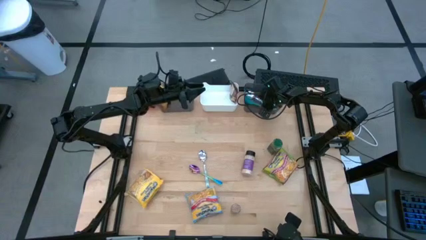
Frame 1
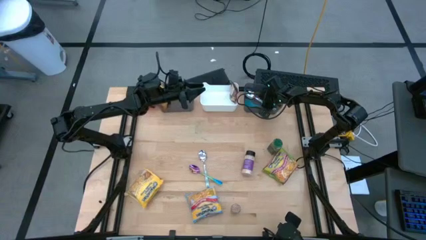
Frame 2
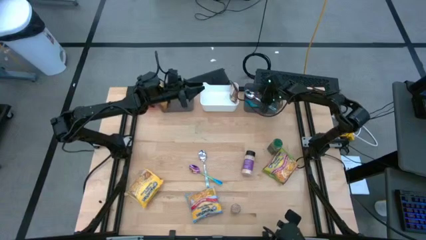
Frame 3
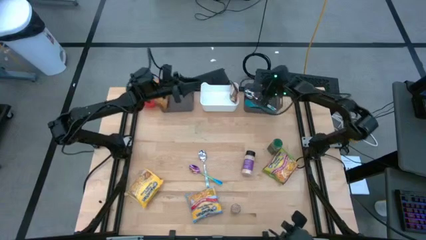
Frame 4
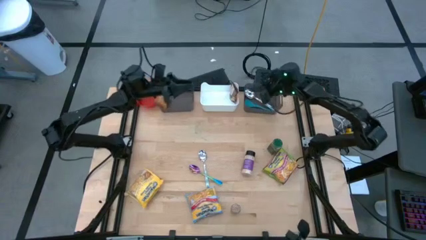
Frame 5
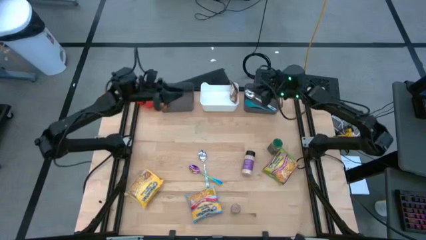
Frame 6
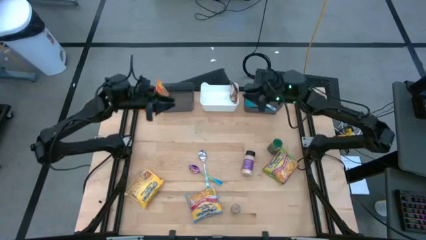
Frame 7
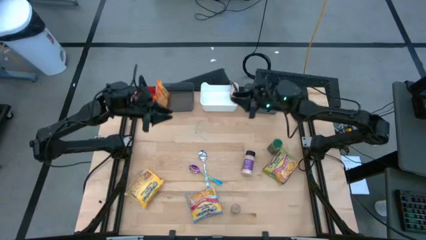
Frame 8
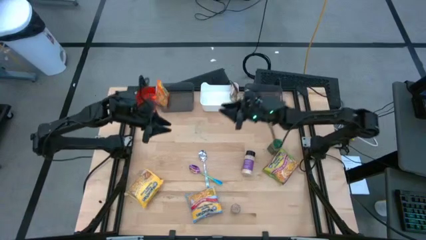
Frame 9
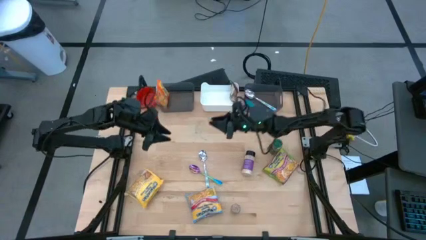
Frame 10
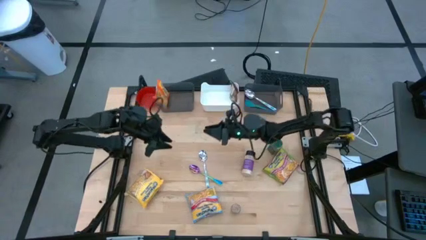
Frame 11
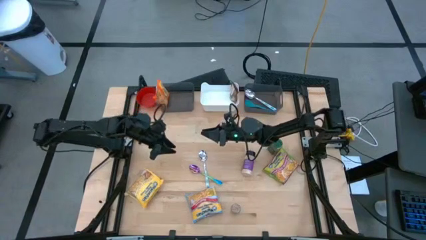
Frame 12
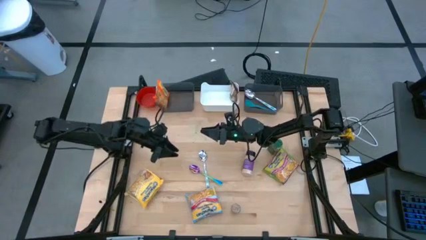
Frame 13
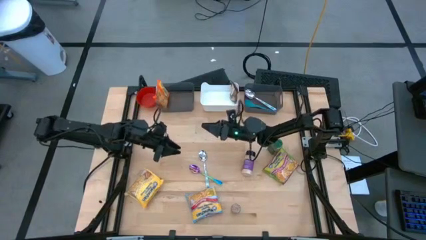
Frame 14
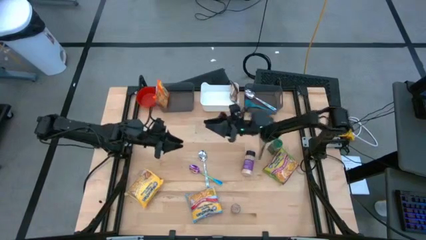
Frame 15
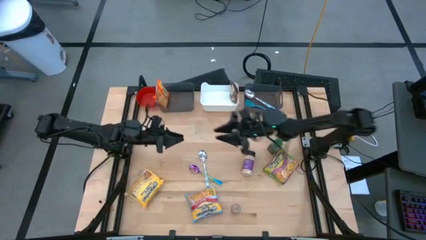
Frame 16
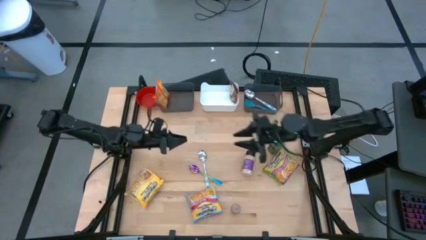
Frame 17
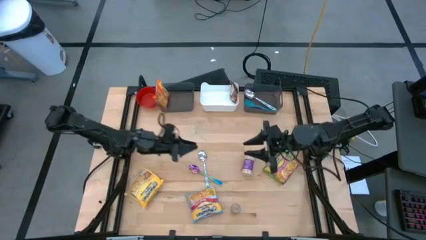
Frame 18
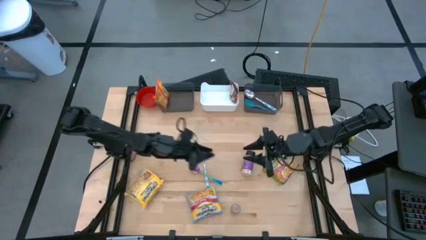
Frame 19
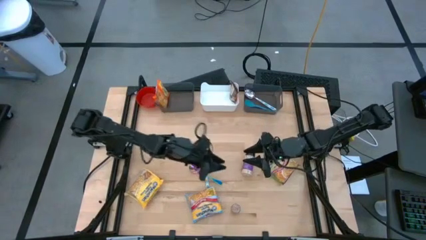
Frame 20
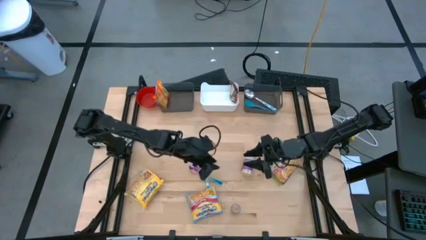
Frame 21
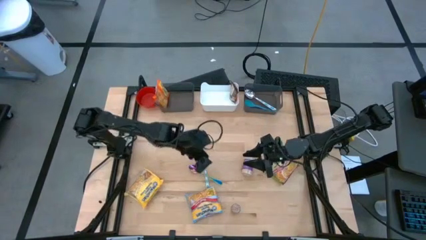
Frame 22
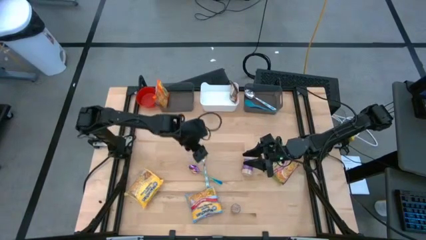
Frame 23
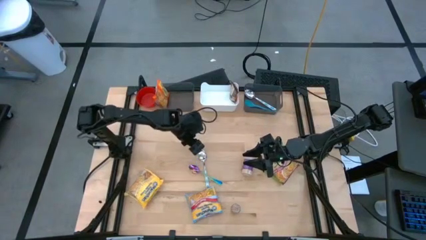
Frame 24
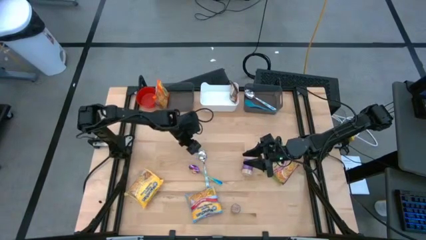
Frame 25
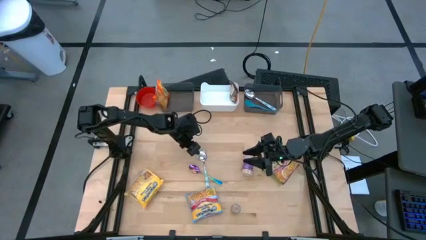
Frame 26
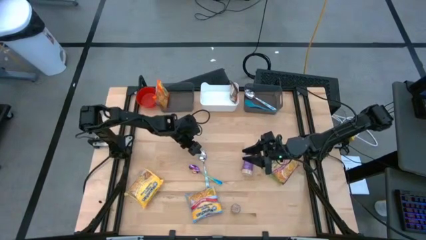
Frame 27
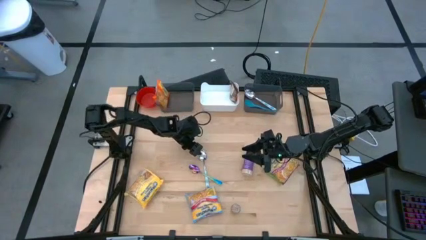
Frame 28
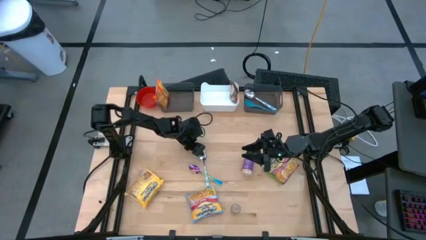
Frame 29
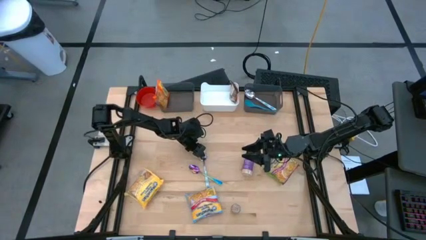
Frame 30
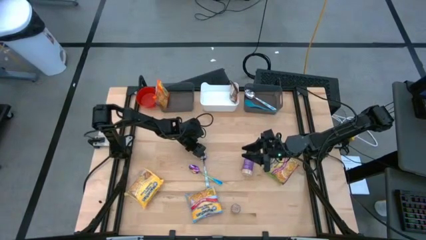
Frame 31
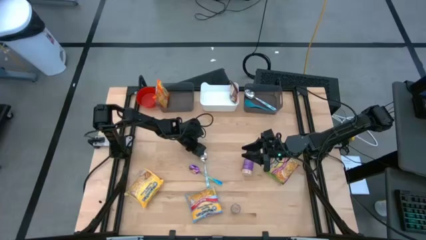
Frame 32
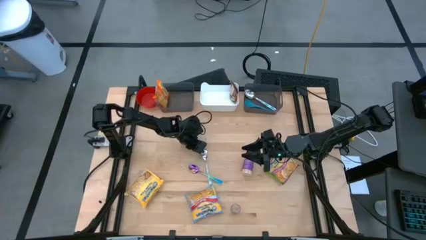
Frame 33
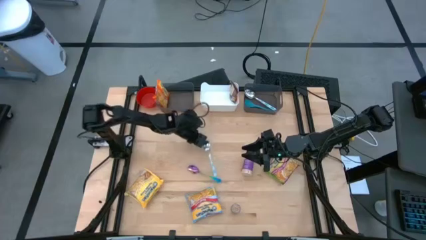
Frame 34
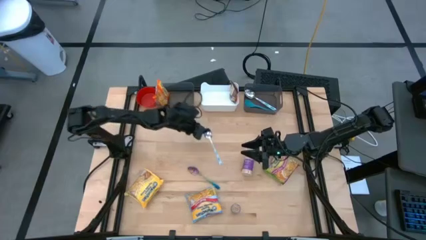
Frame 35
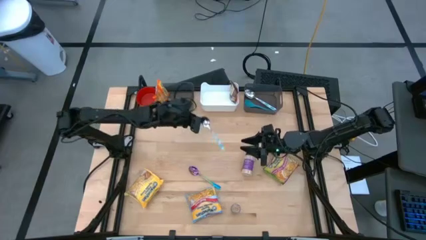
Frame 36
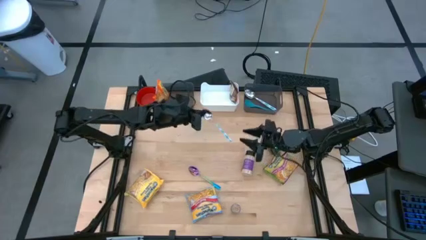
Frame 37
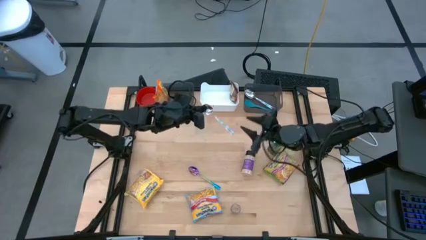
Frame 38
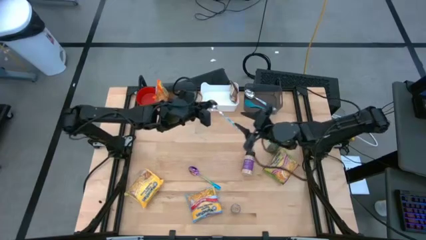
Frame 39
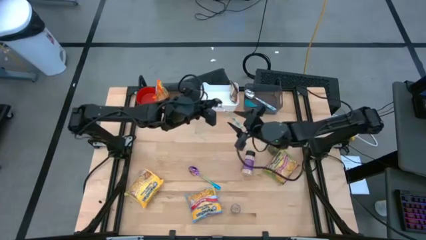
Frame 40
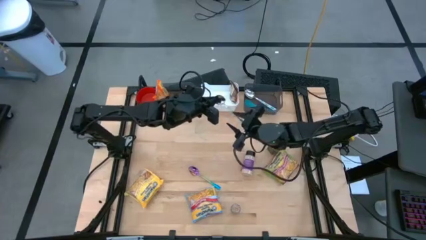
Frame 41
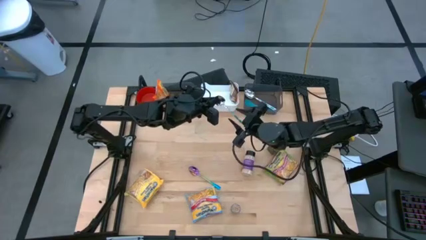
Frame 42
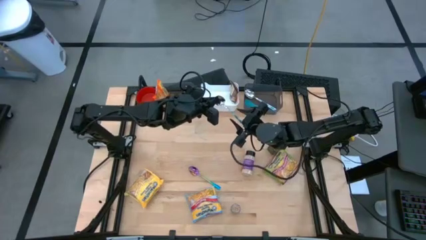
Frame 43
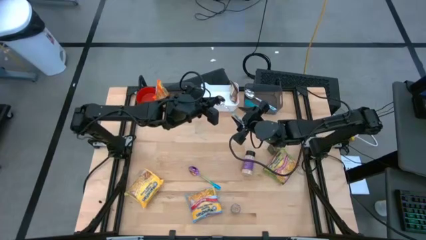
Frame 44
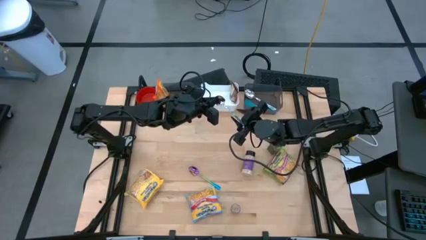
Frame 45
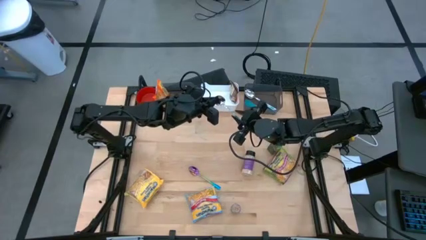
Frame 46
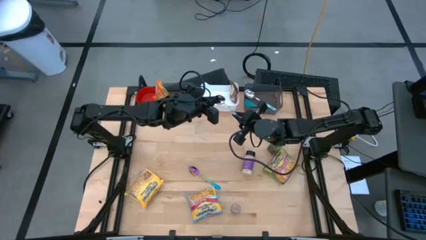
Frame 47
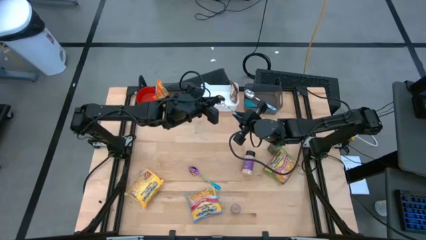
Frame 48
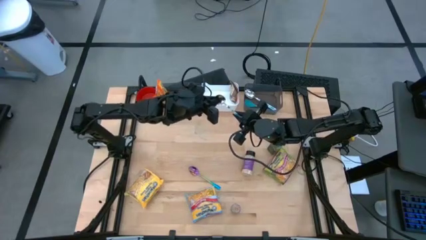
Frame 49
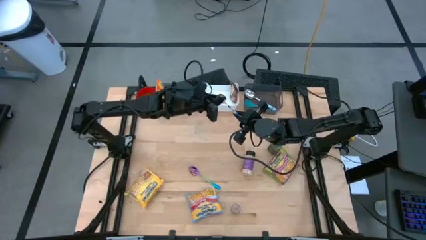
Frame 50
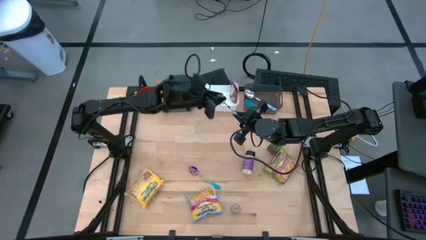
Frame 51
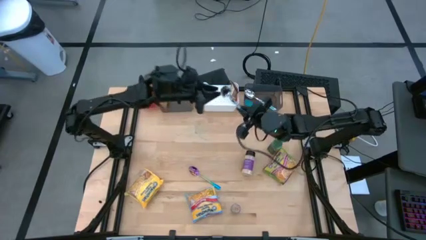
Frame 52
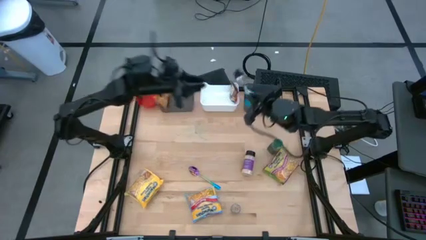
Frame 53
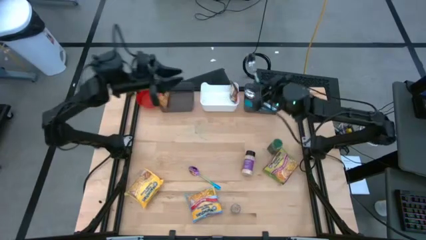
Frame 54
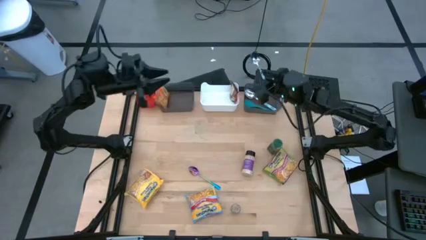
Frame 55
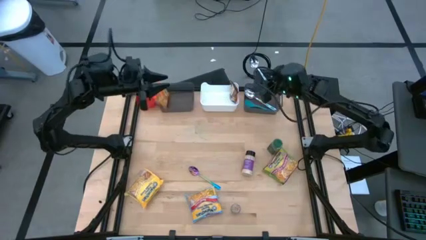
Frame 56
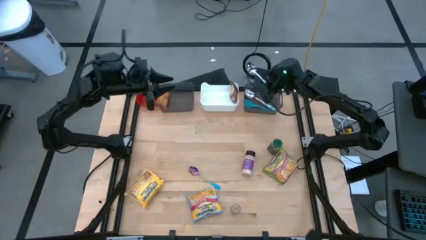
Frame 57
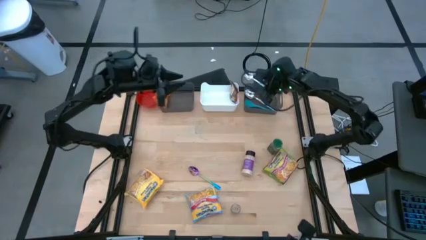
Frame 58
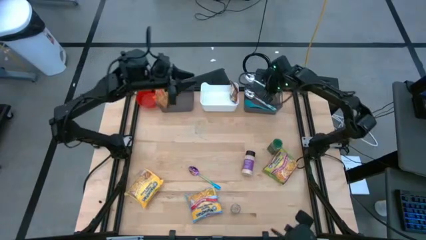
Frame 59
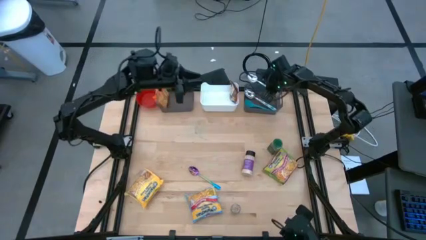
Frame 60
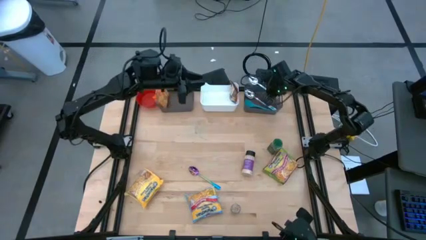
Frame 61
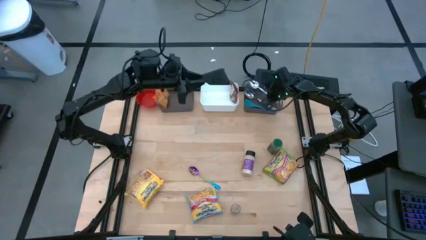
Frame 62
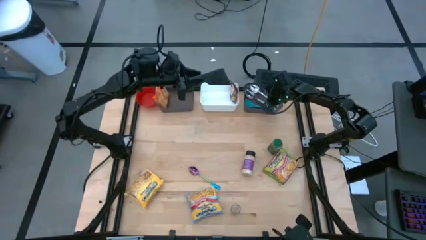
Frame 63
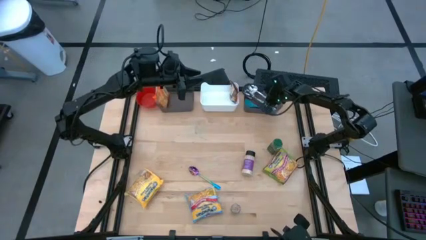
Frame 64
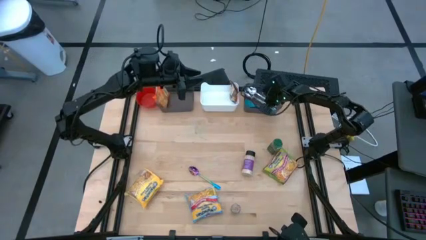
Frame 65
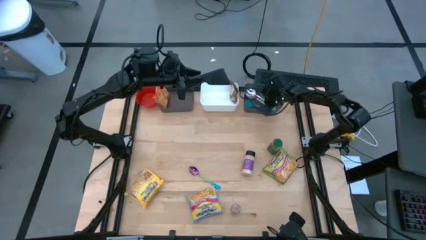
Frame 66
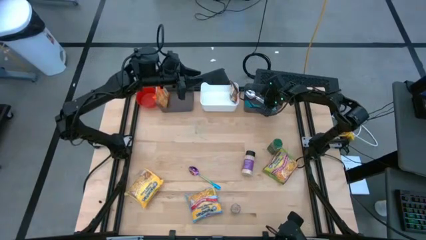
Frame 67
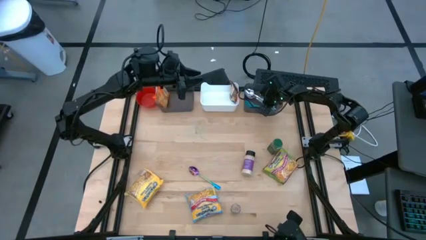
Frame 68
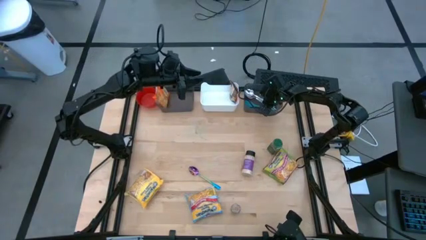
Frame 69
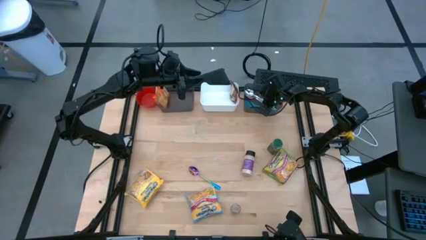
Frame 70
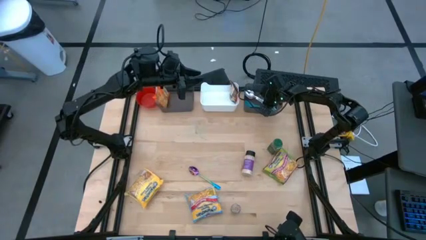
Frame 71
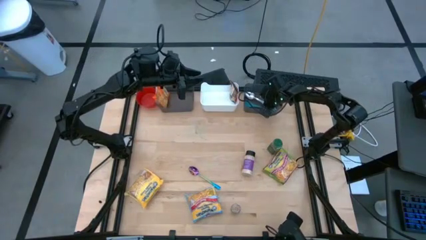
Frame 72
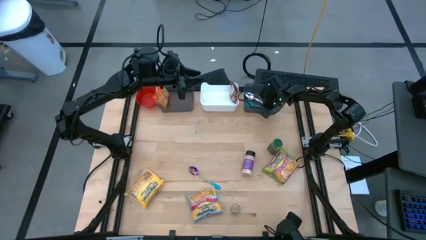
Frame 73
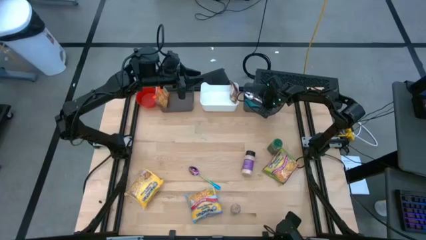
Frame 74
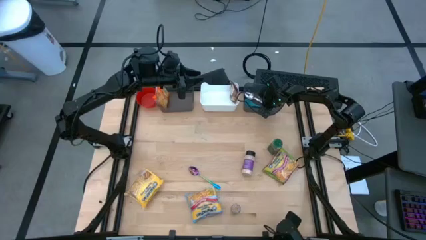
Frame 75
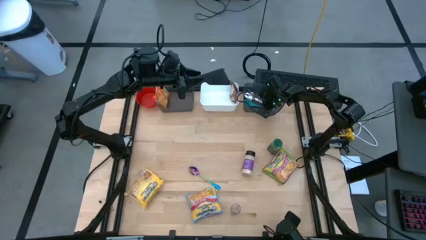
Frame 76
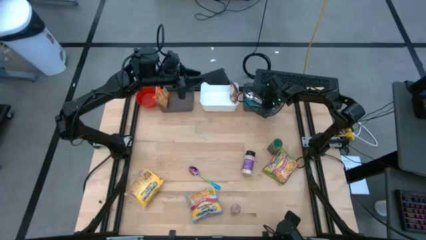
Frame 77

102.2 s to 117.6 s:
Task: Pick & Place Food Item
Put the light blue spoon into the right black bin
